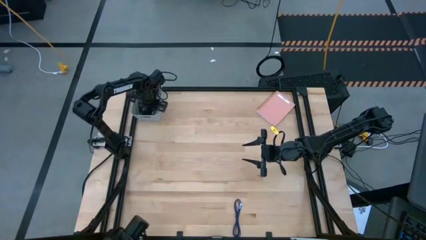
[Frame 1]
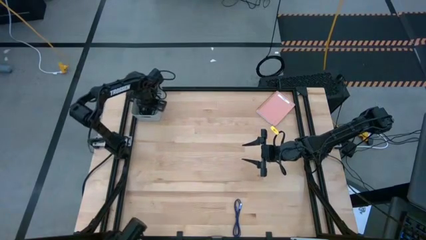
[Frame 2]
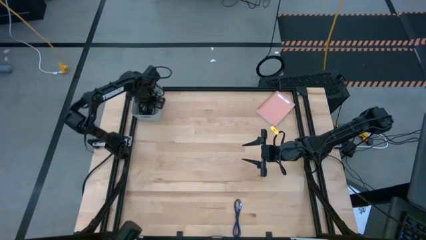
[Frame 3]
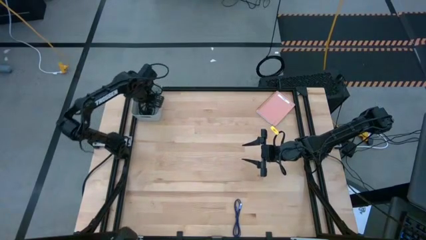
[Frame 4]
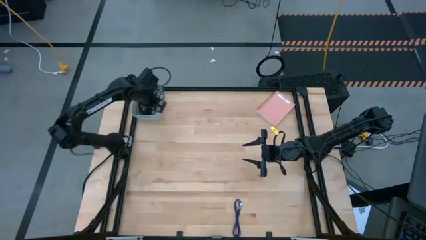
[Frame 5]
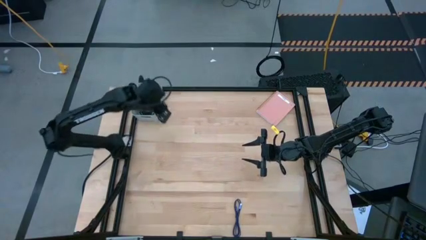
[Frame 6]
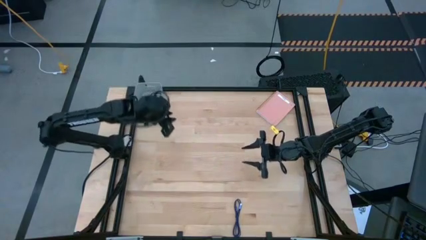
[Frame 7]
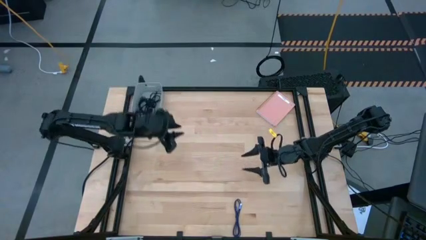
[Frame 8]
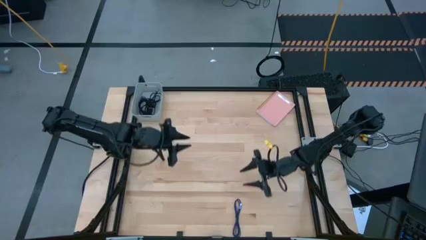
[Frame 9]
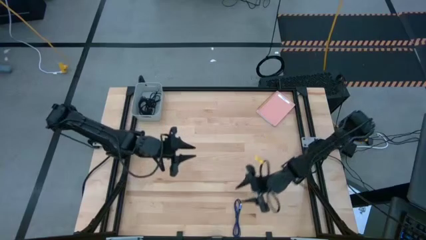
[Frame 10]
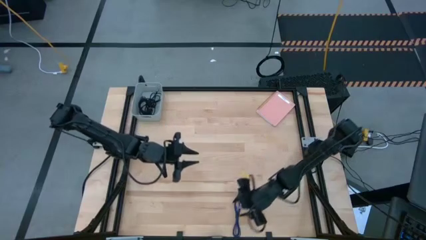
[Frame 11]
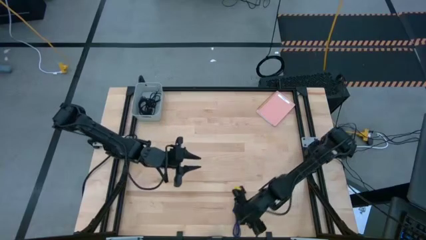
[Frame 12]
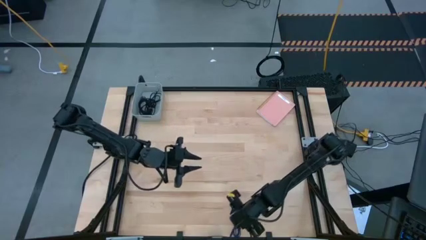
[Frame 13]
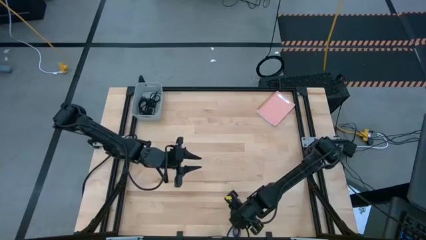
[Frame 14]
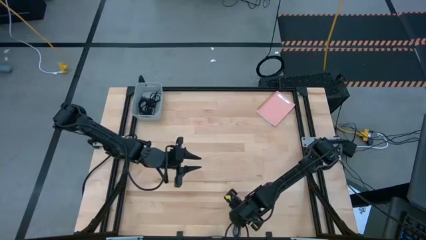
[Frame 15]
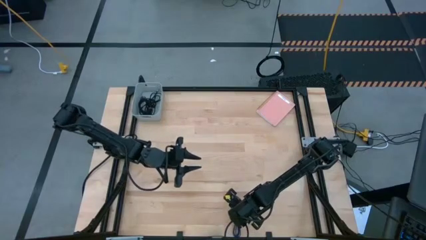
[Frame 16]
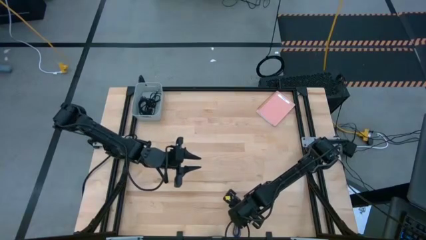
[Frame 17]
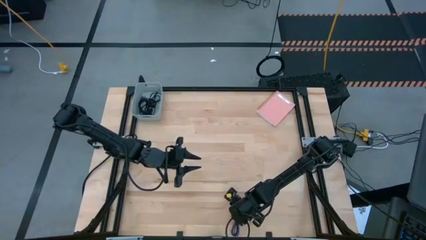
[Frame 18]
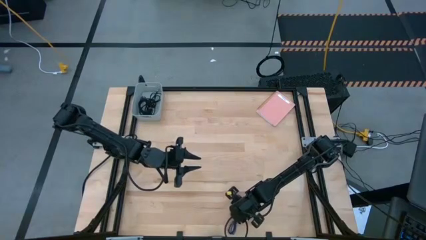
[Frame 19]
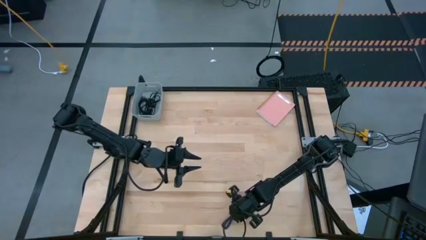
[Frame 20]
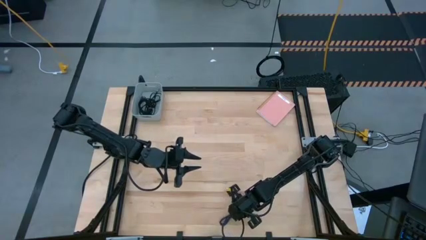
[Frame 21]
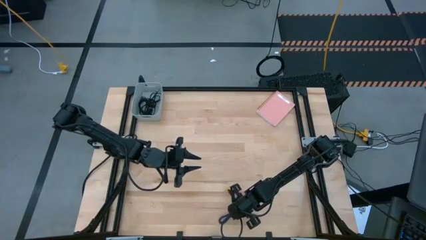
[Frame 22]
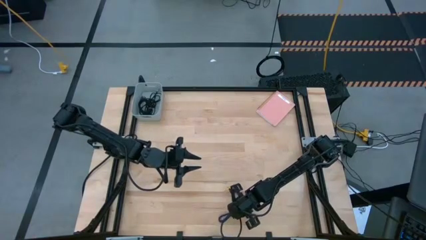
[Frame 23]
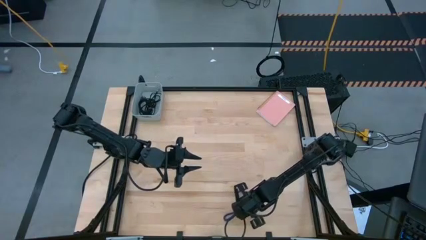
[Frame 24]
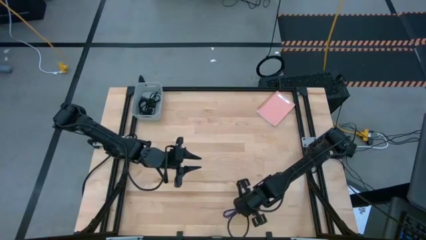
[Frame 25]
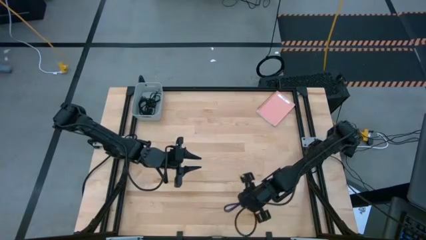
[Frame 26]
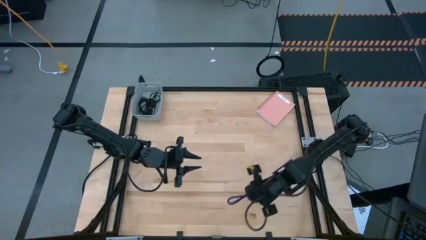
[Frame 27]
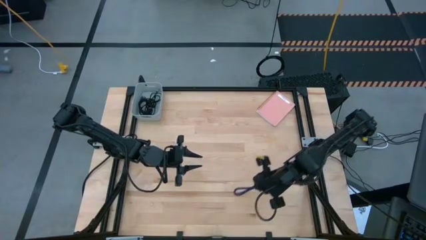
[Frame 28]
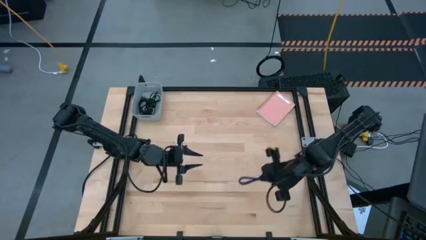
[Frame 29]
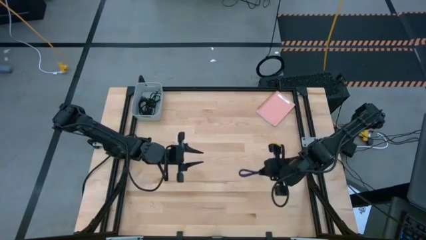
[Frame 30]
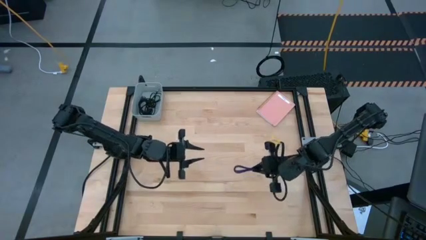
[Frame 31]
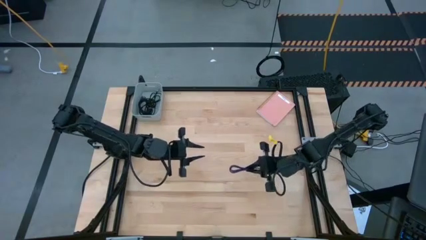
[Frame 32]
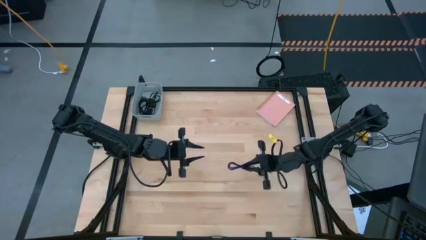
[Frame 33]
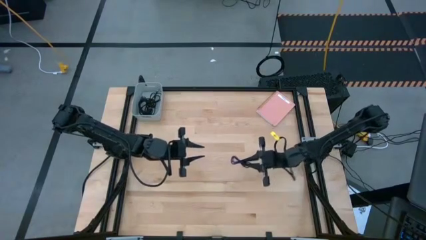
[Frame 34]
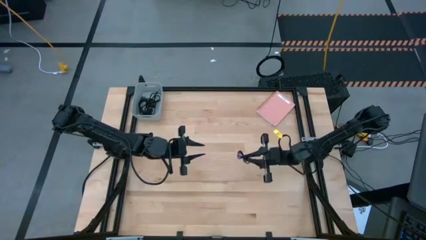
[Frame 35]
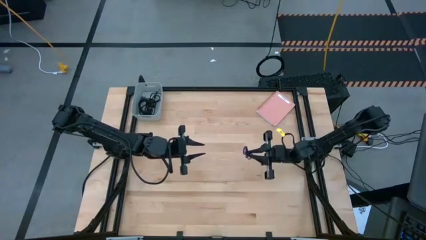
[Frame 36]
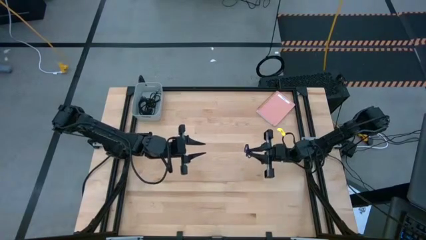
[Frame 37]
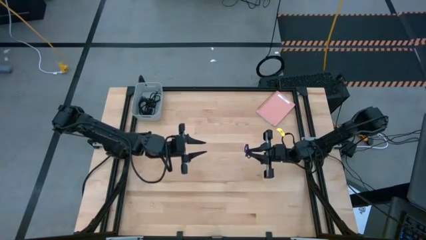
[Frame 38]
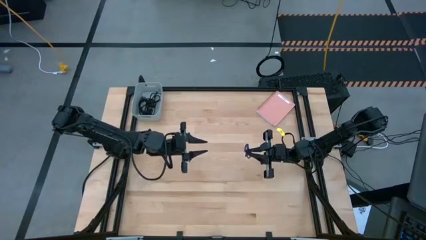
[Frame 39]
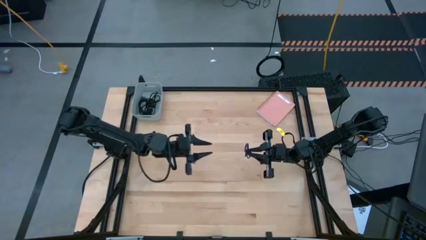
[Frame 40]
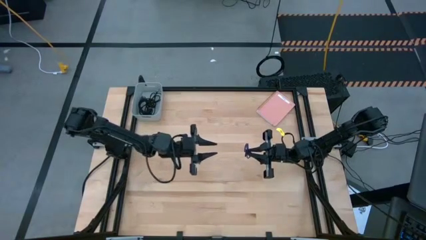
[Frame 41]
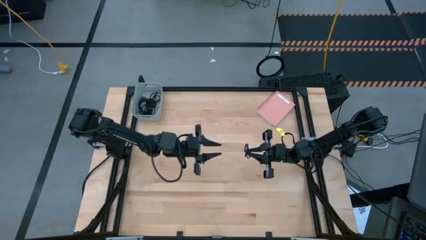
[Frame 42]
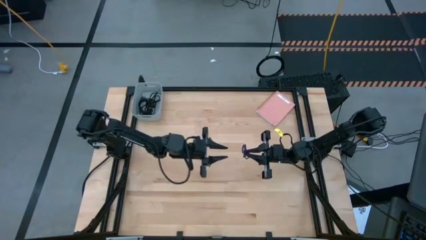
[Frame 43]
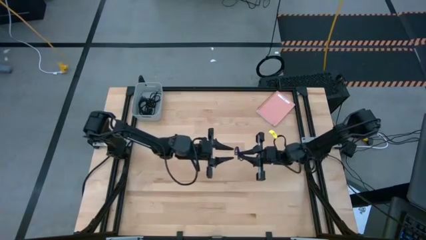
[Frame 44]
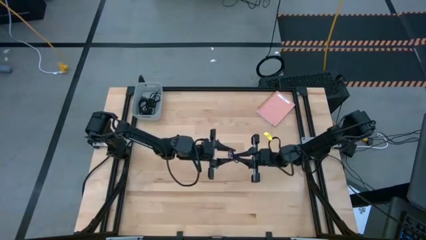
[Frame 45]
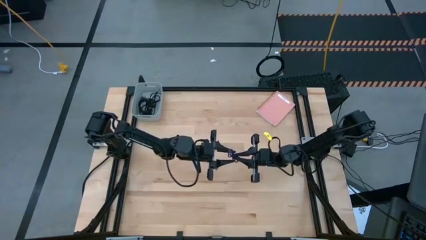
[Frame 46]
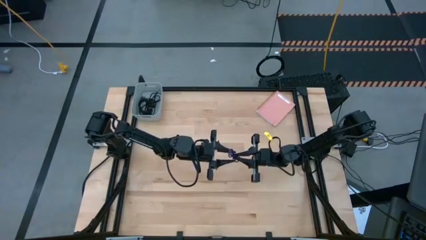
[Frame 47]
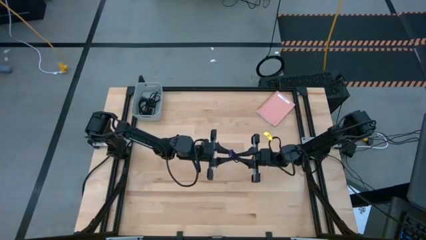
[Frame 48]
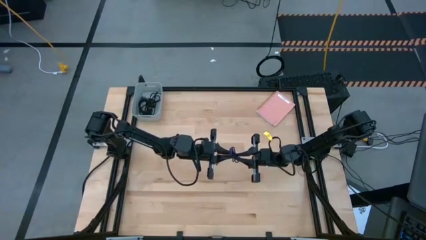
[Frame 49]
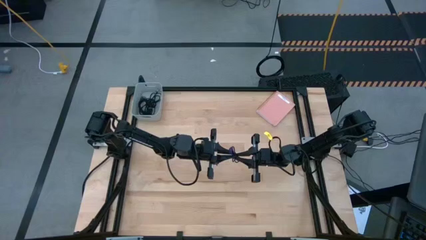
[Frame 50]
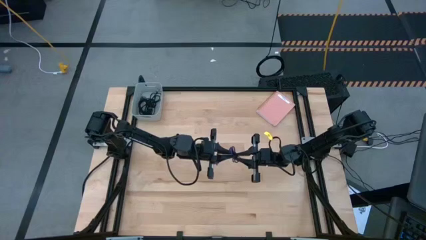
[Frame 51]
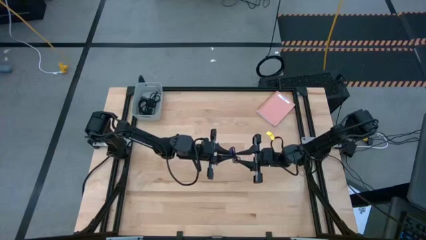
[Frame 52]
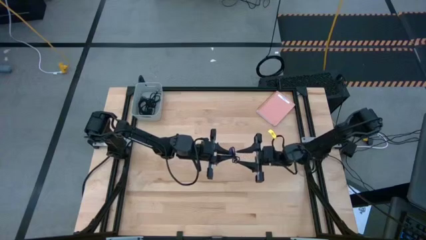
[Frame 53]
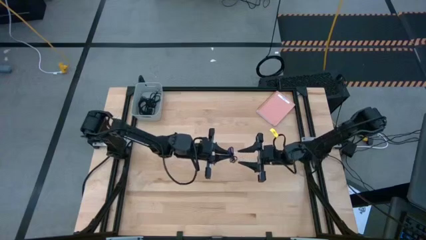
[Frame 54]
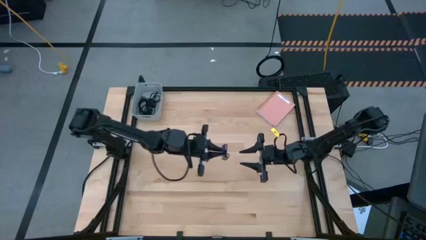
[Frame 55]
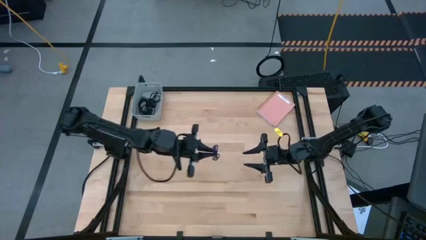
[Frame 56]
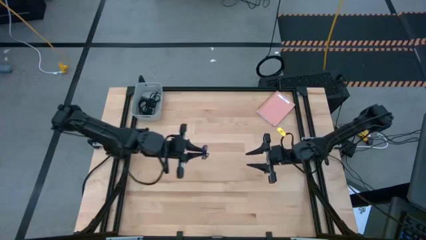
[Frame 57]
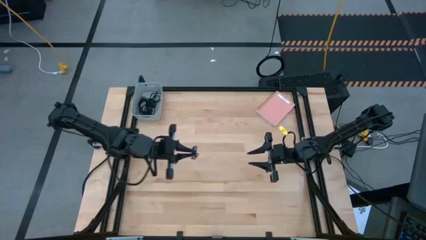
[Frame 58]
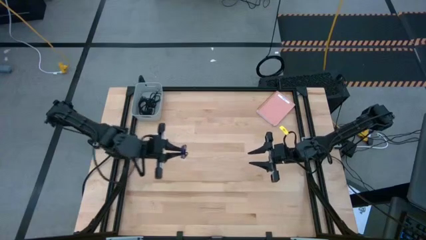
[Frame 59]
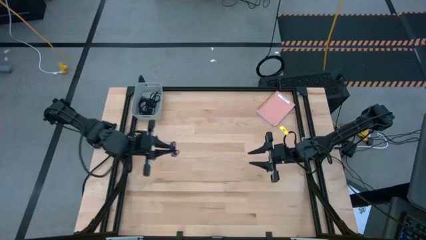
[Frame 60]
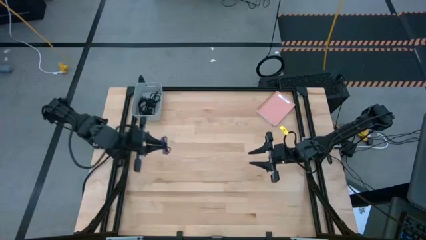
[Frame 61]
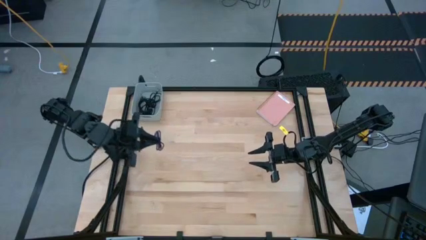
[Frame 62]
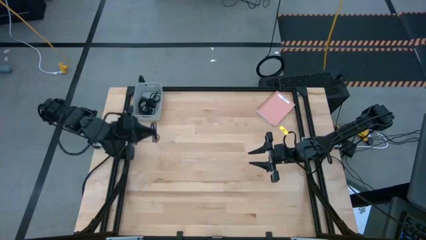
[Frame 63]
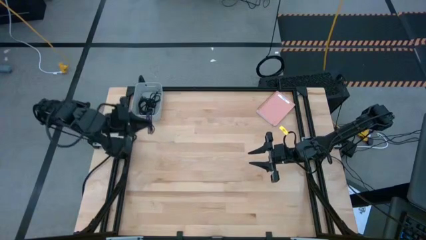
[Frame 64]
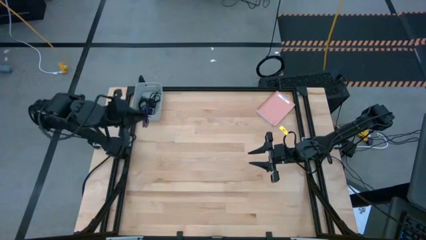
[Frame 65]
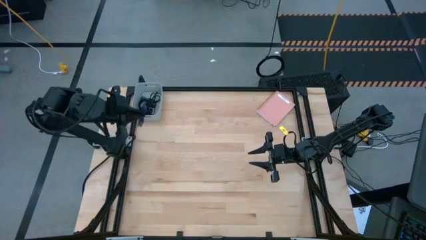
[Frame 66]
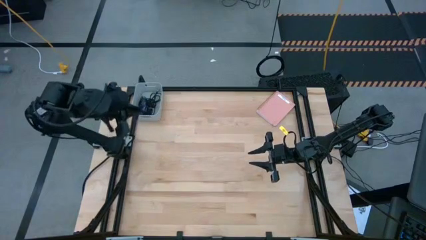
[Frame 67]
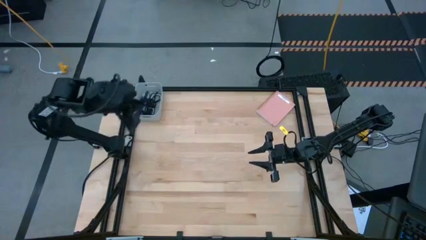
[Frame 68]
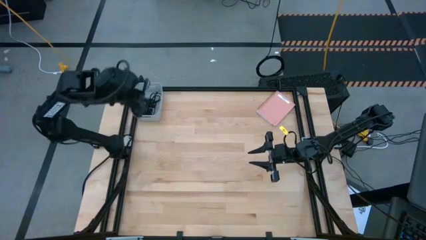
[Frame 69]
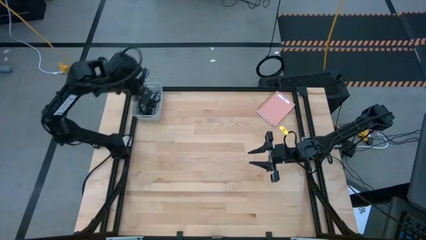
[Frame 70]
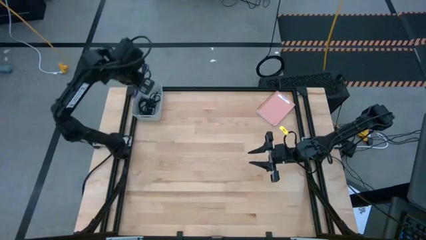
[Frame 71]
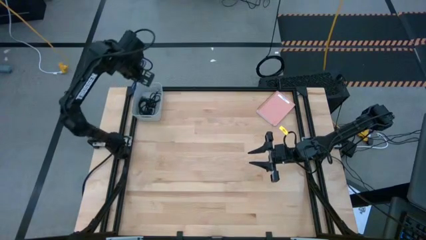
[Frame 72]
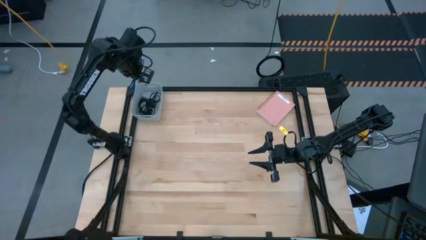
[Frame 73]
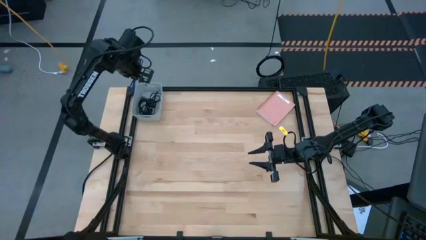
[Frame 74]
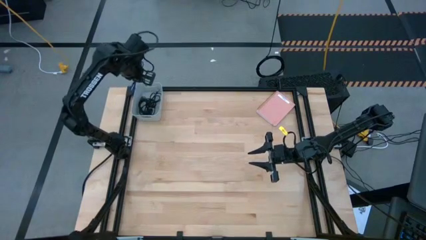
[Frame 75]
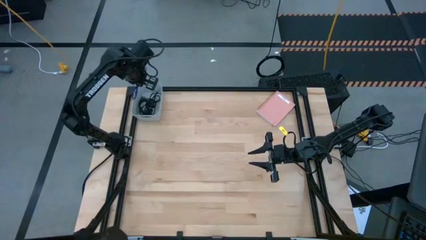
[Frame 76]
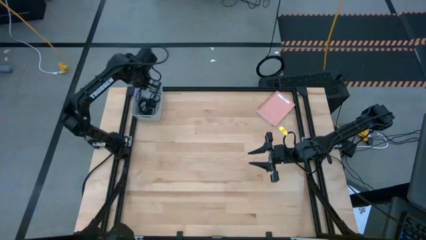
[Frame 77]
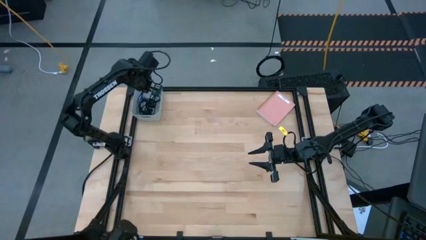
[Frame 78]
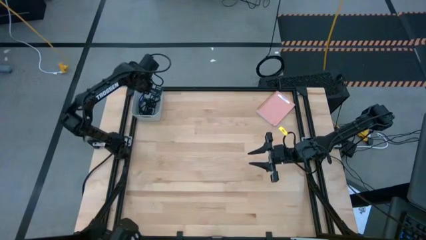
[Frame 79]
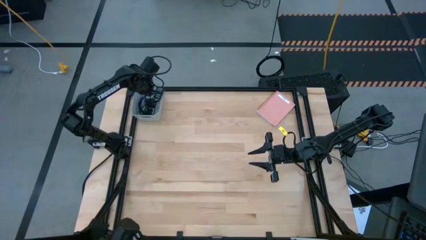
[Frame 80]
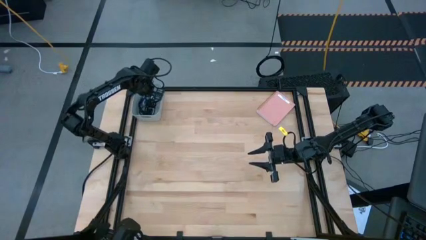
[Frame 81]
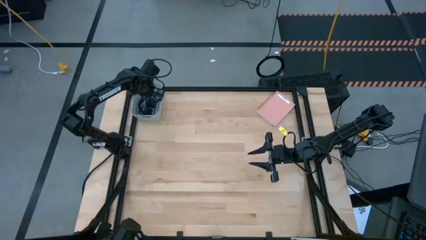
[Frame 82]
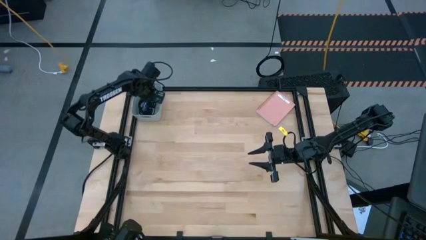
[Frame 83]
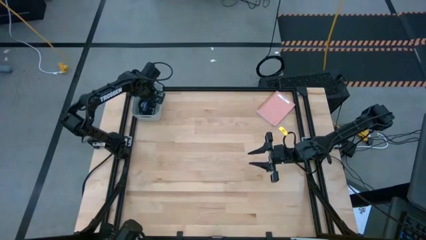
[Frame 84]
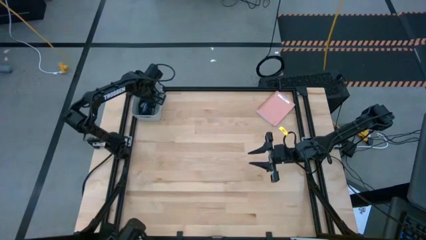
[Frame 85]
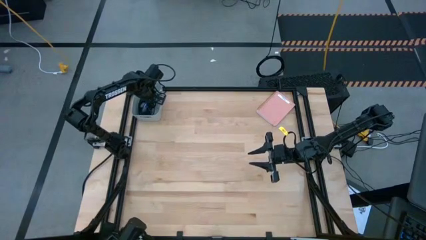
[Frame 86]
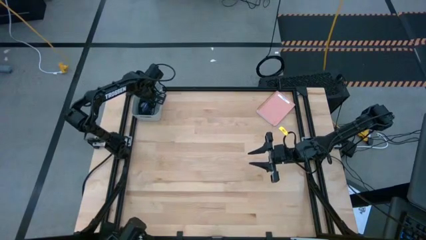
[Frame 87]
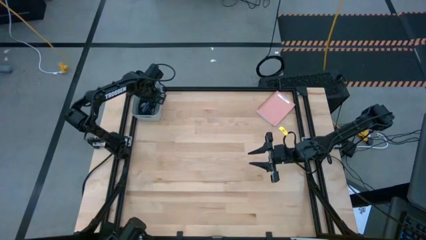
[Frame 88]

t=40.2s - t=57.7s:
Task: Pick and place USB-C Cables
Put the purple charger cable into the gray bin
